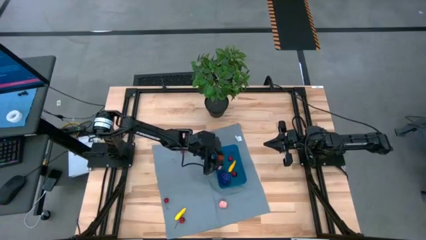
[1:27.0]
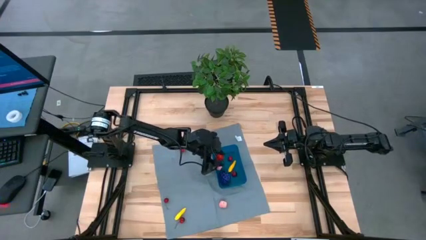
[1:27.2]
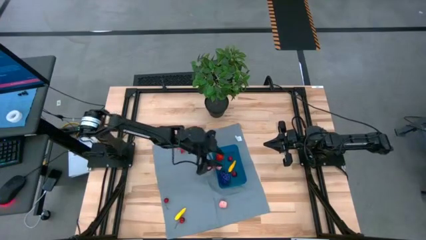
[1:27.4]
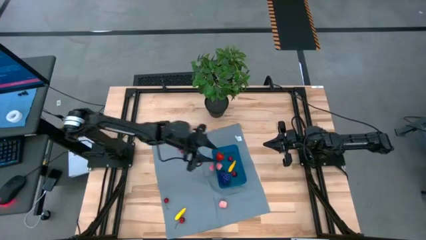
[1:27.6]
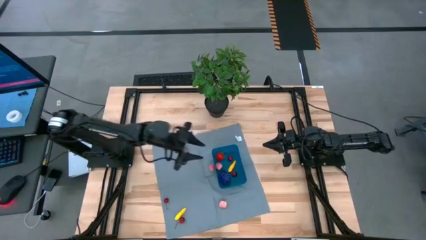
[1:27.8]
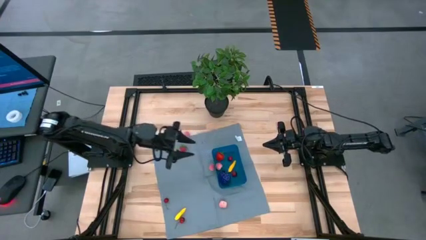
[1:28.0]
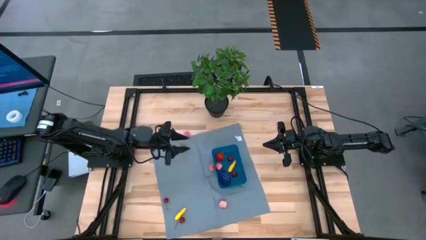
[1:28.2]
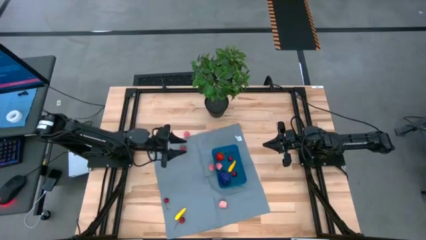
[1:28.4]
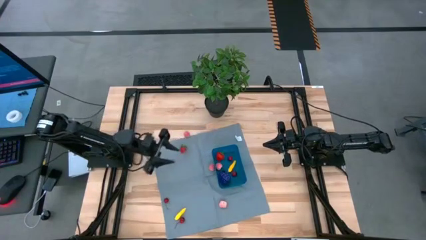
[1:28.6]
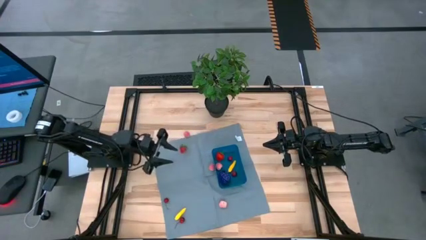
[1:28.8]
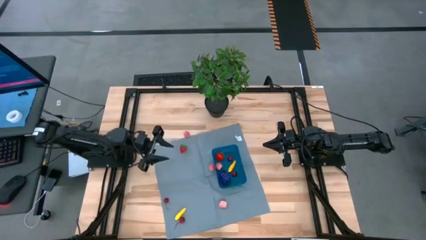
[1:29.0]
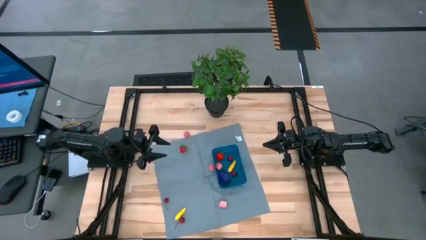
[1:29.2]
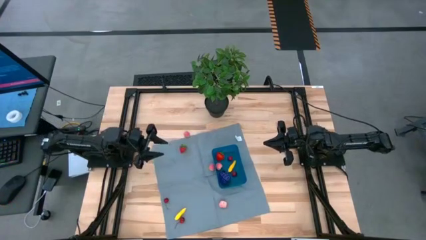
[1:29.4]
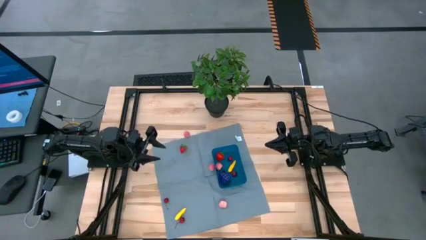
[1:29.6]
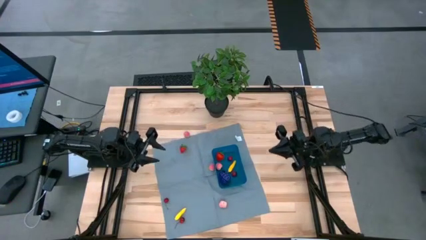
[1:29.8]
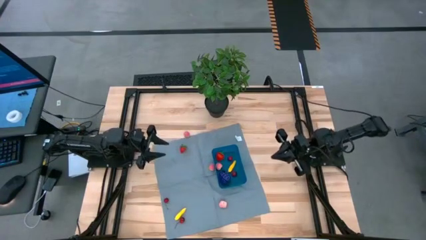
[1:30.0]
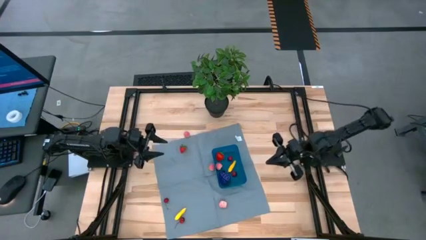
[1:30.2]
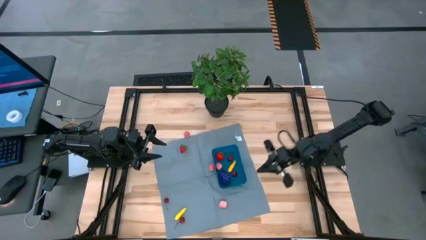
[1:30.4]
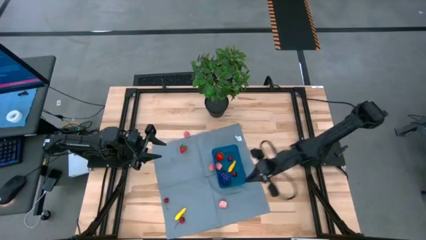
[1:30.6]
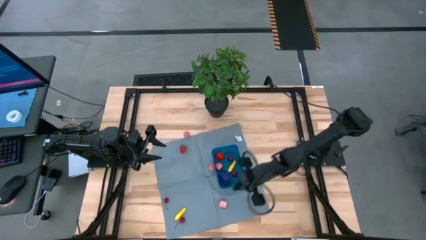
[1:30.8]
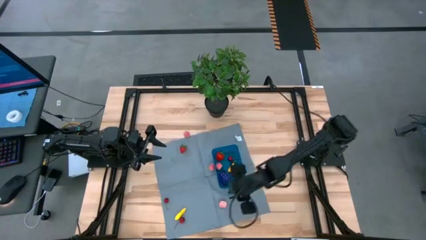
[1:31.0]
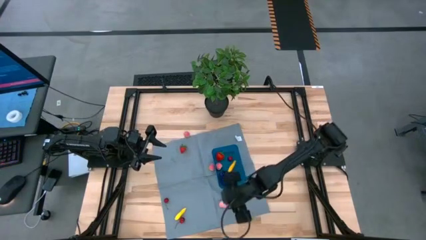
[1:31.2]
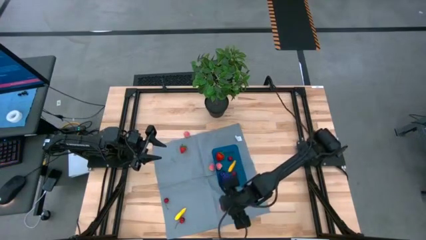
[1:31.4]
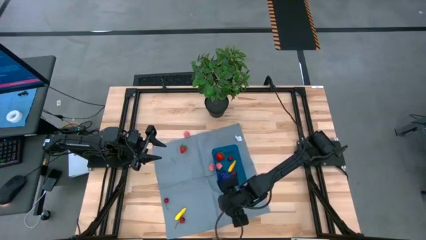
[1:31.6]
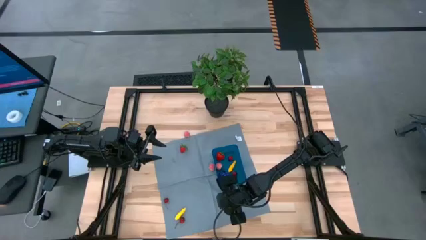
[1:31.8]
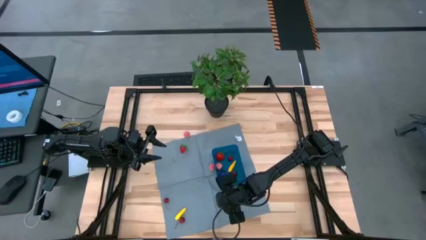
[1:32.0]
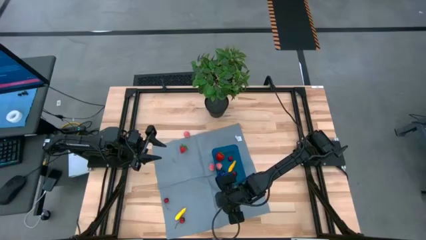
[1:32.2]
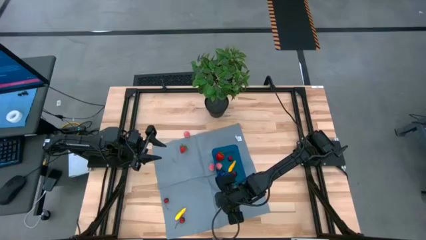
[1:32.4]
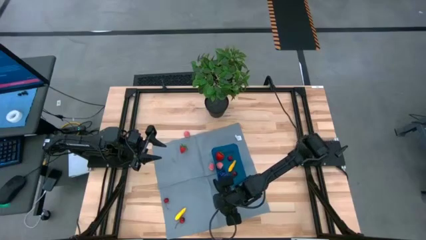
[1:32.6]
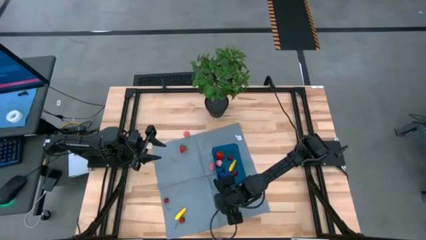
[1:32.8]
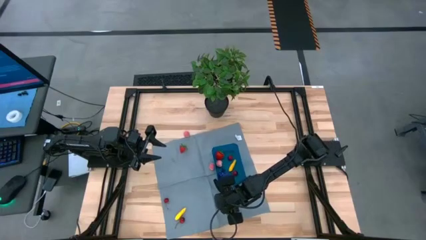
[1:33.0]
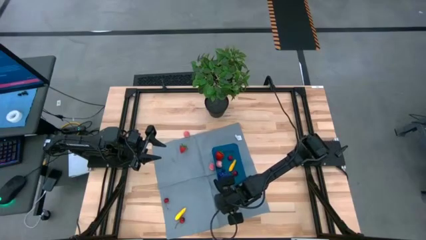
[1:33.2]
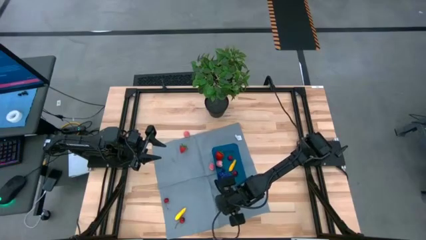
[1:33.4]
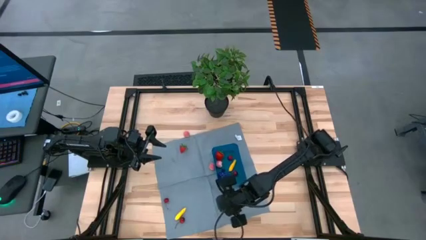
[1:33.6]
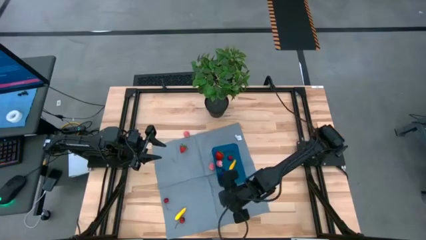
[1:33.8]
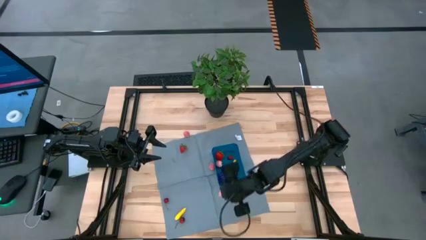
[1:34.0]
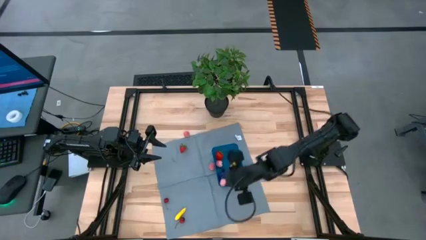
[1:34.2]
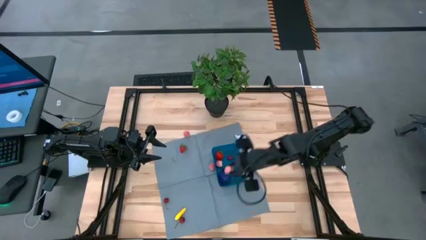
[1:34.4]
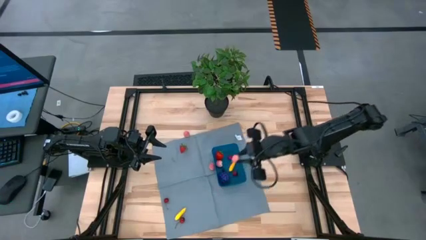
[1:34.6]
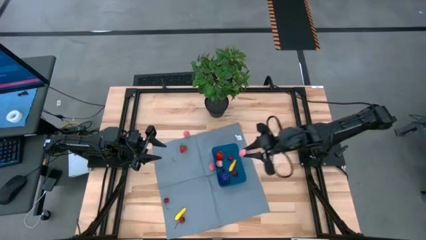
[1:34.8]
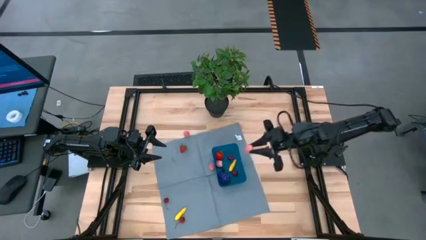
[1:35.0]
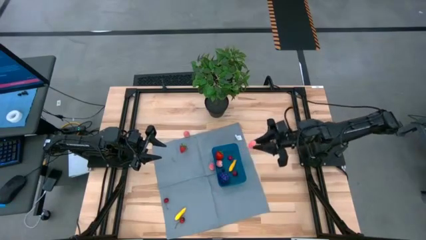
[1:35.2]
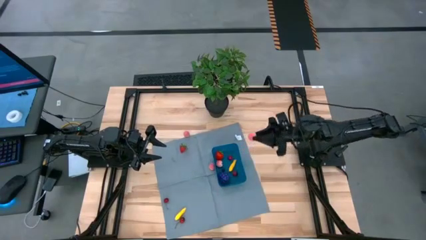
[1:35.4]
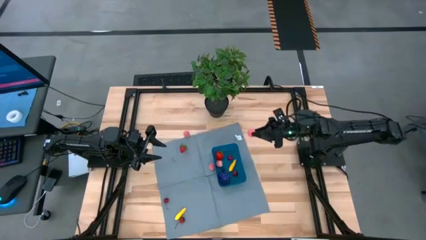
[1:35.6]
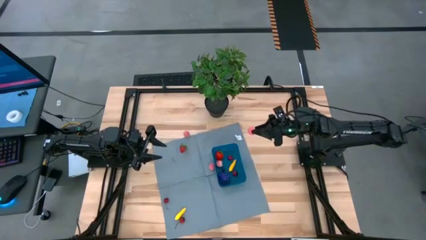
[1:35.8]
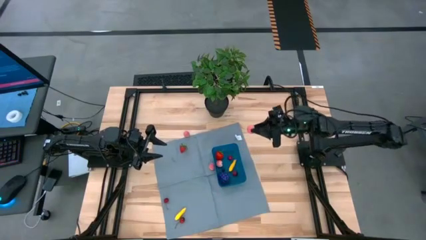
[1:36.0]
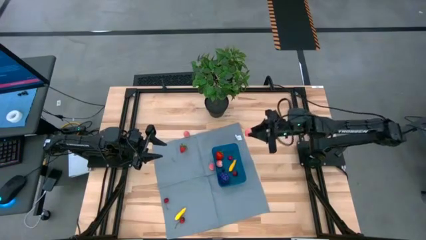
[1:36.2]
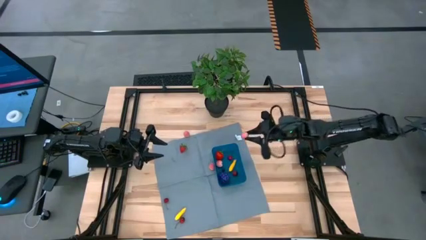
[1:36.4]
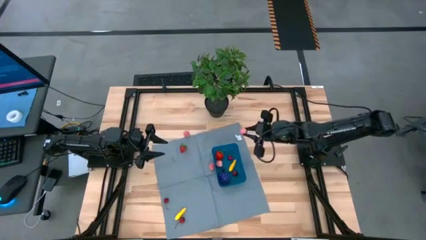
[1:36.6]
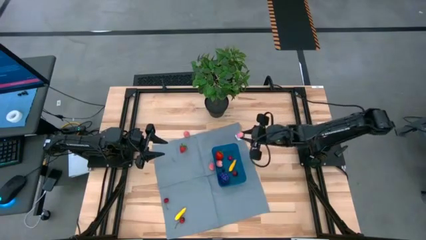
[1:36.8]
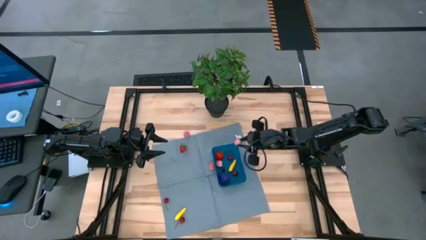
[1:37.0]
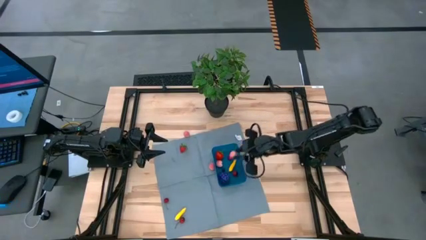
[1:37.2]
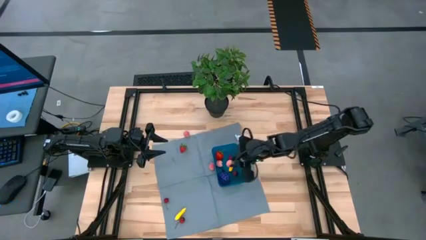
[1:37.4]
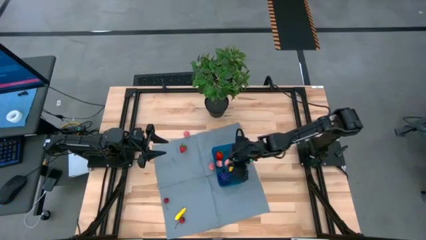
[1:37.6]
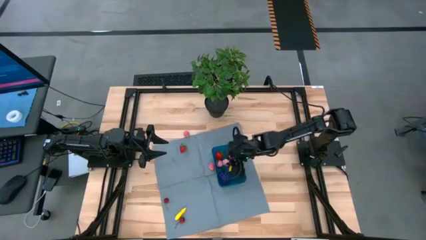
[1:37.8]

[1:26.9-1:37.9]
Task: Pick and placing Produce into tupperware
Put the peach into the bin
